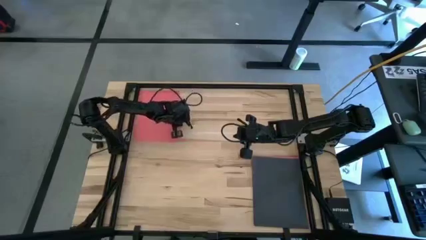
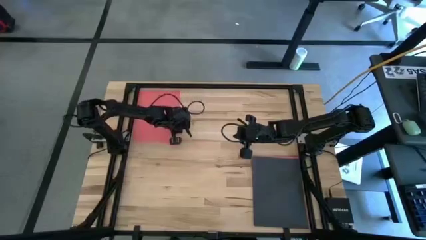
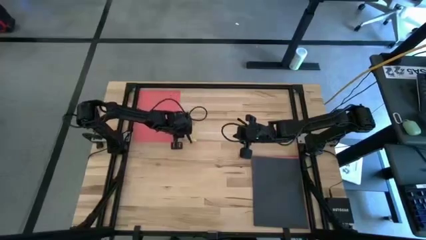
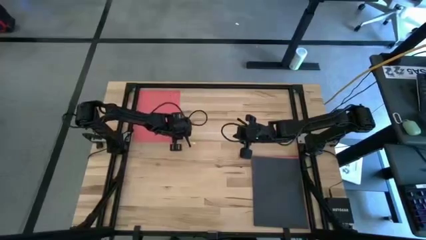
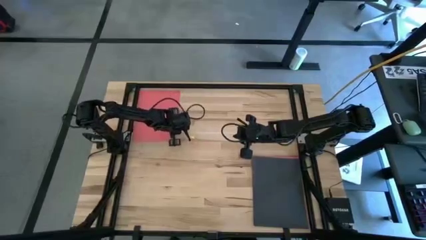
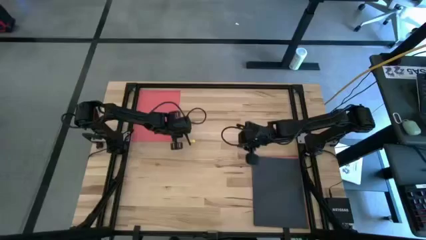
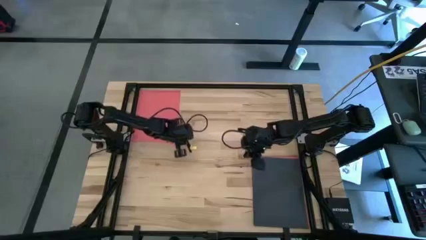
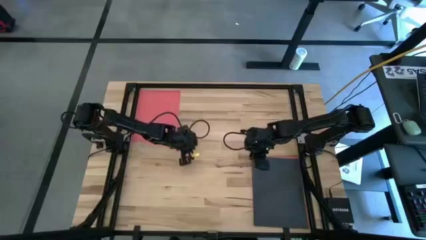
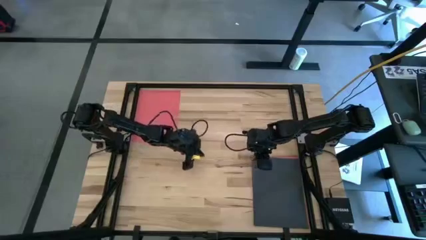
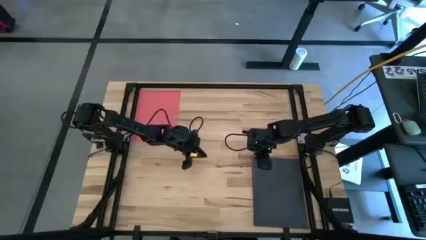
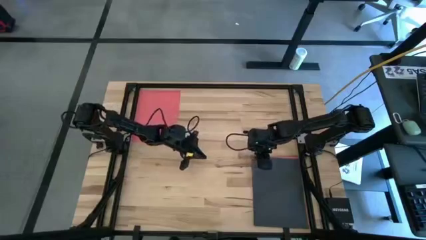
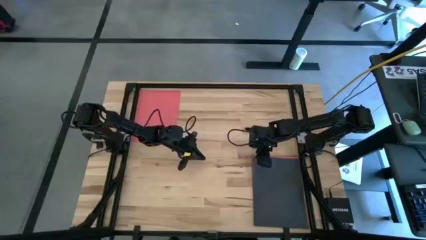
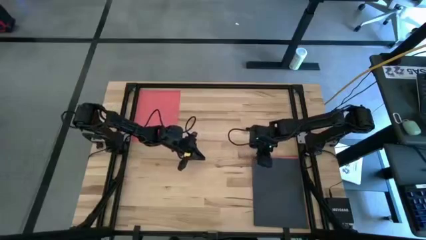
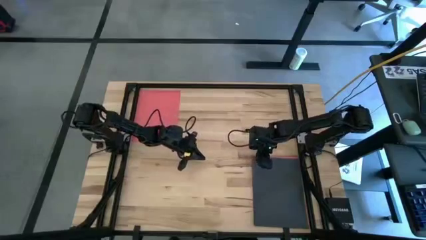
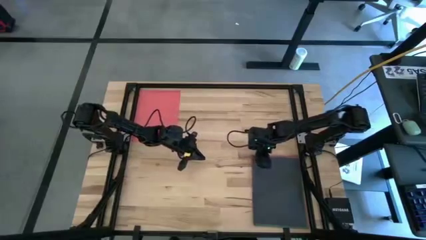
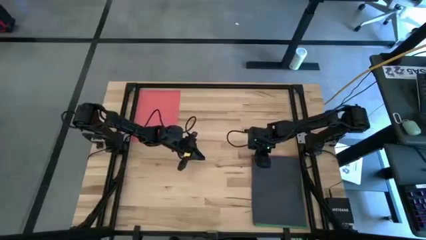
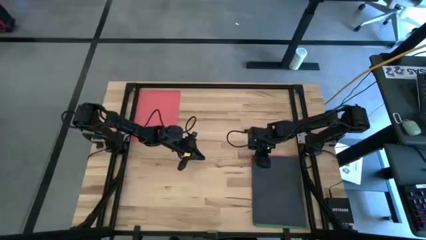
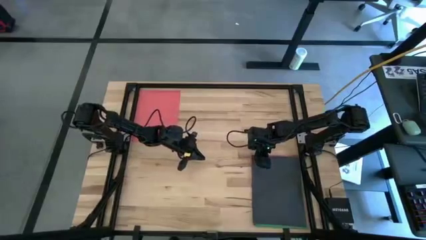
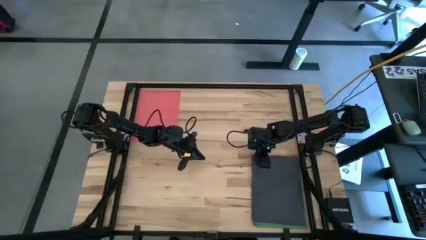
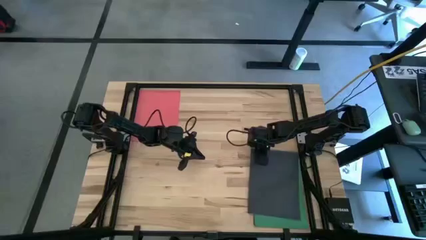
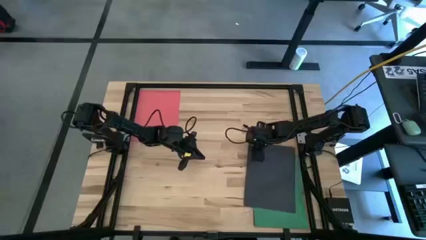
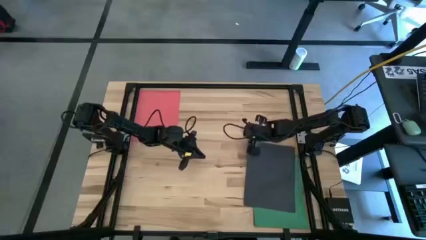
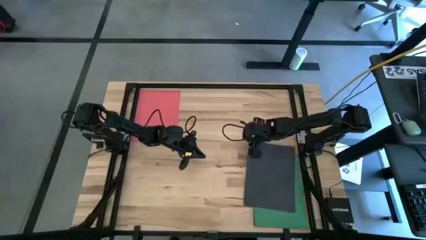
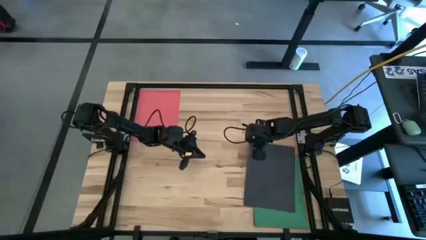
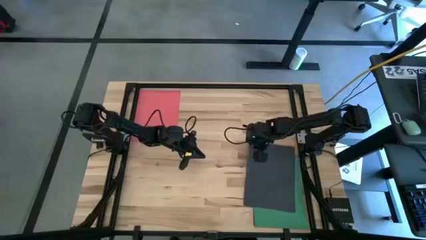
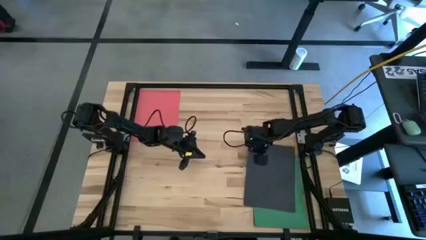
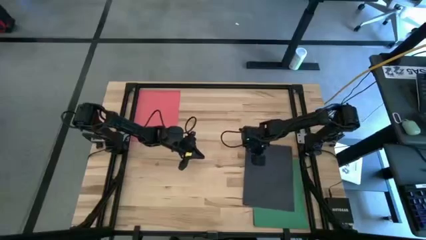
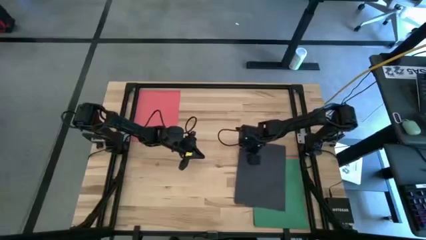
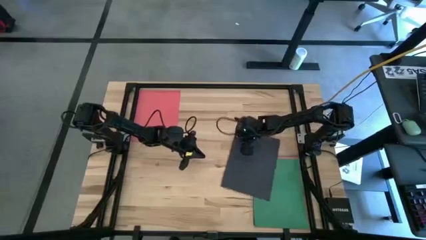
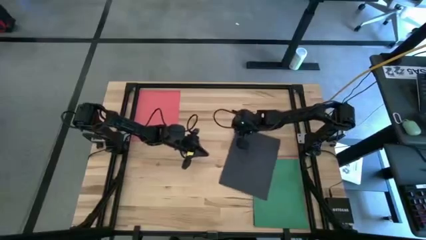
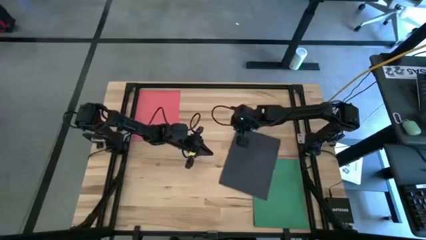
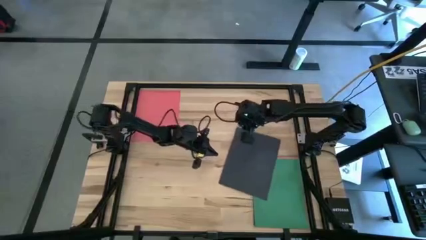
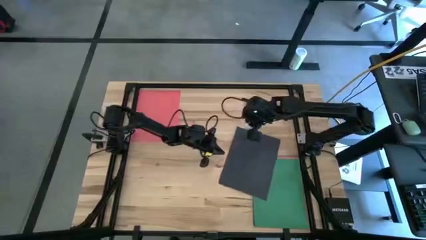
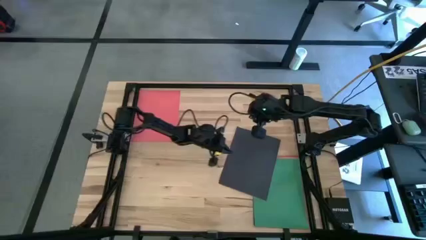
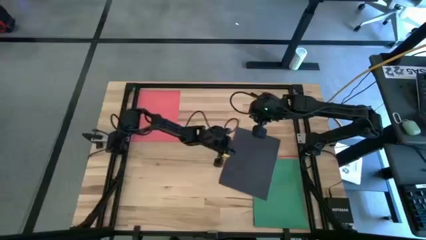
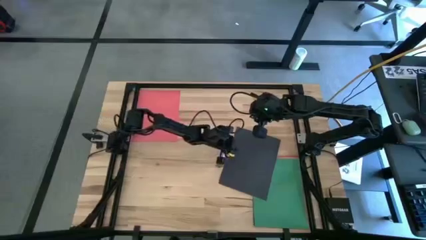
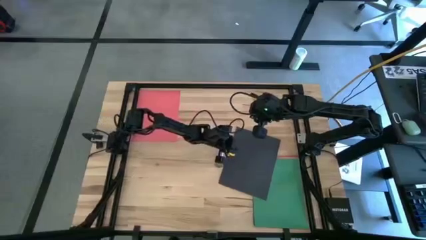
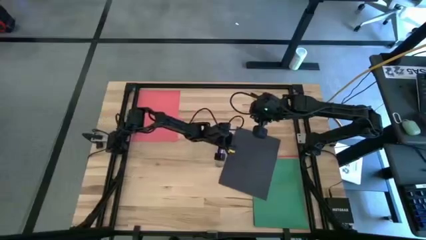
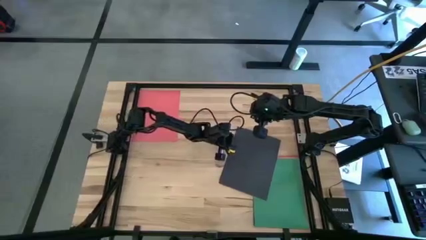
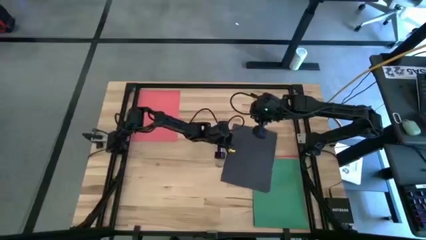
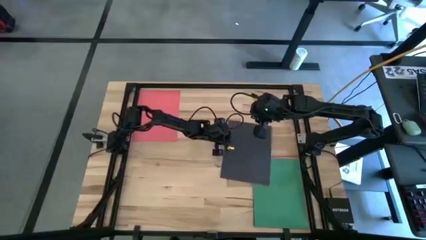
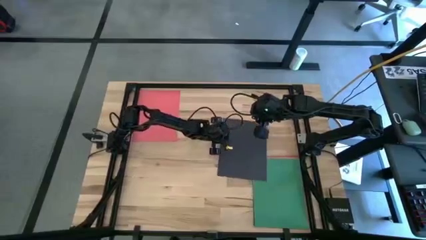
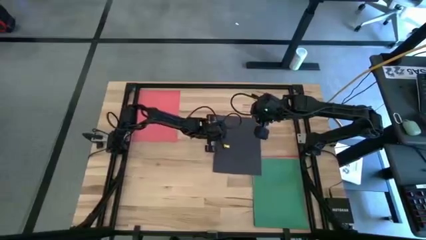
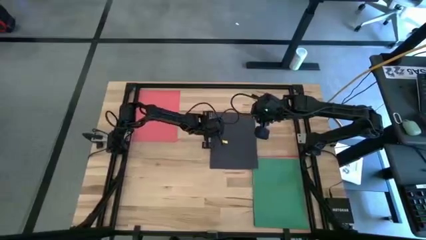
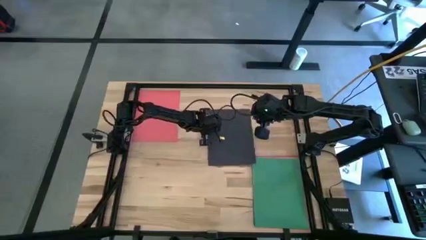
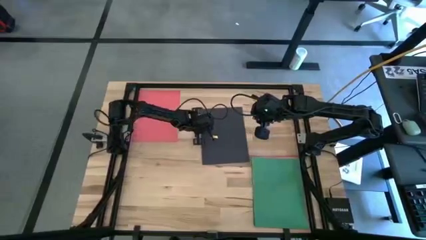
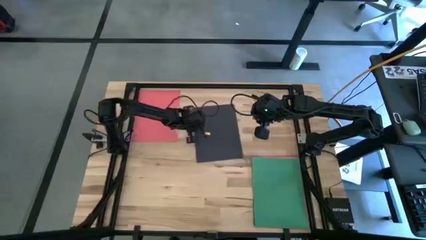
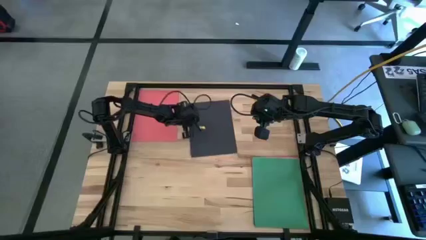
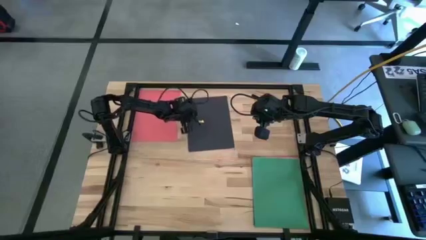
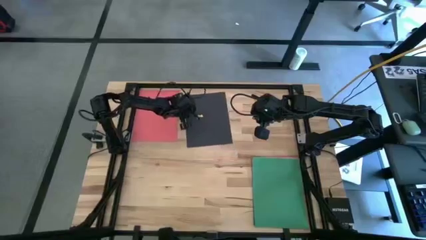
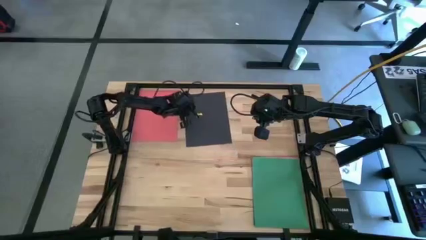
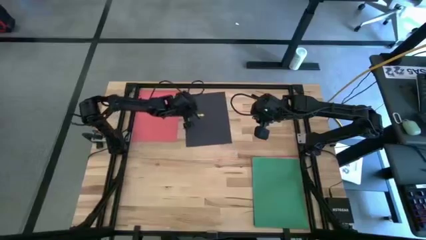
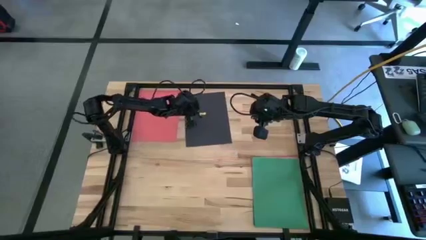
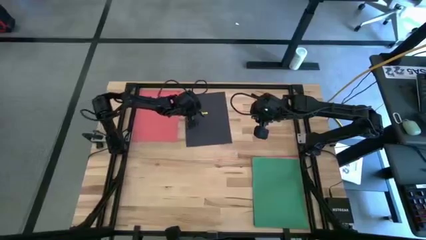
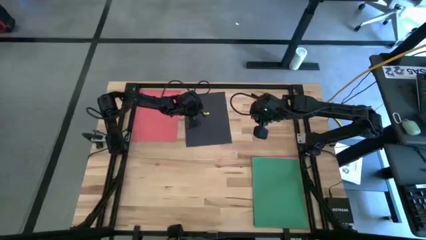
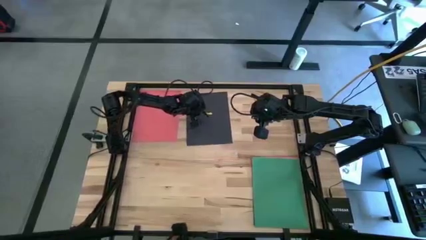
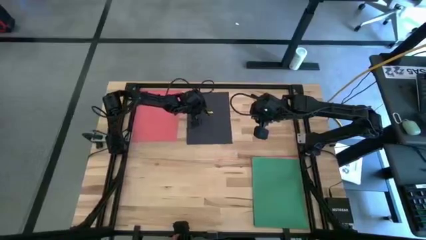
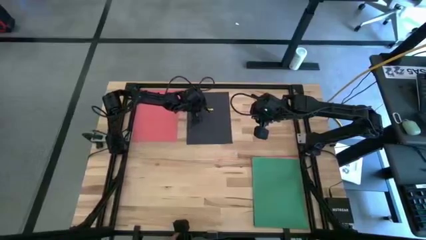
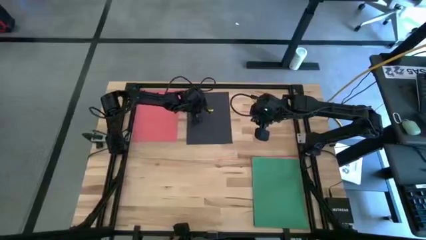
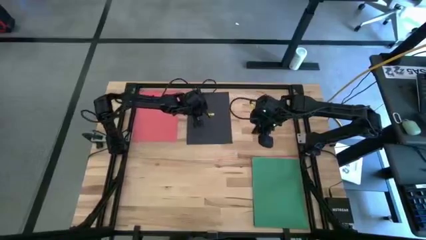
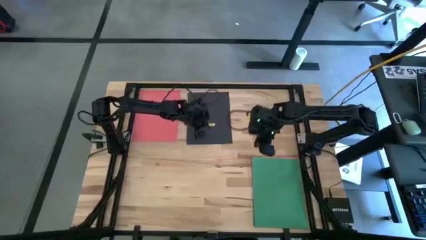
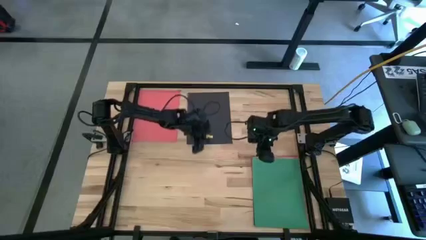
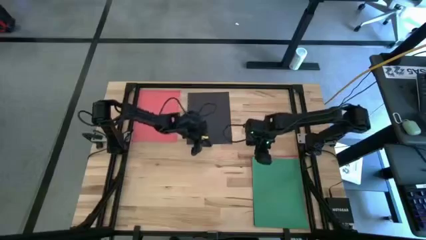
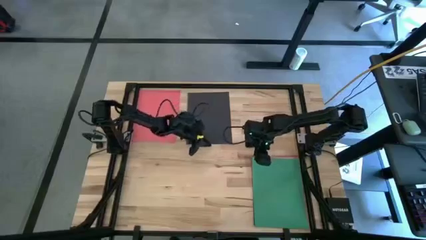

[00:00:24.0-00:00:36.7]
Task: Organize paper
Move the black paper to the top center of the table
